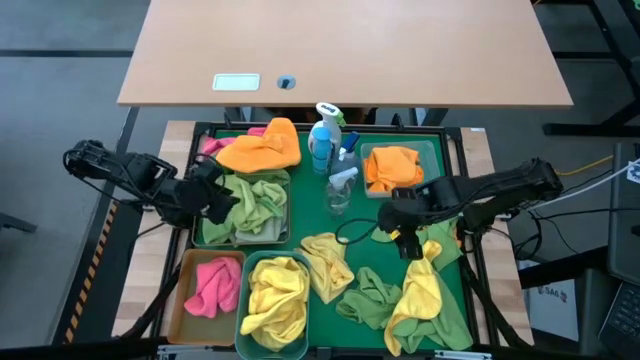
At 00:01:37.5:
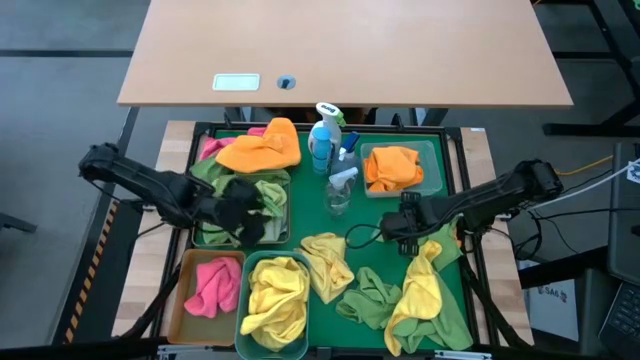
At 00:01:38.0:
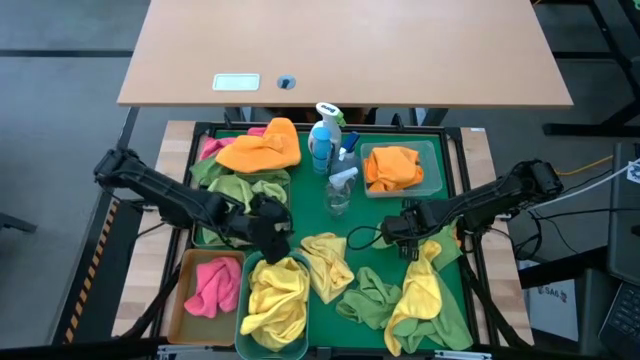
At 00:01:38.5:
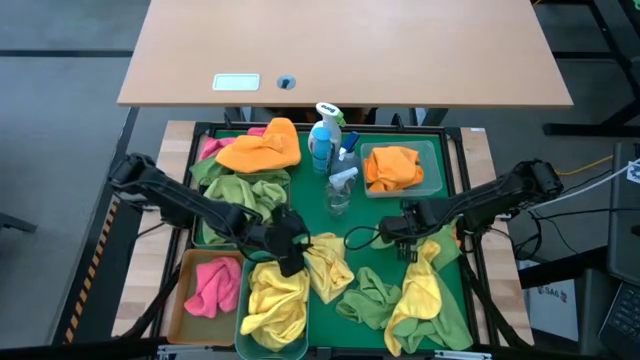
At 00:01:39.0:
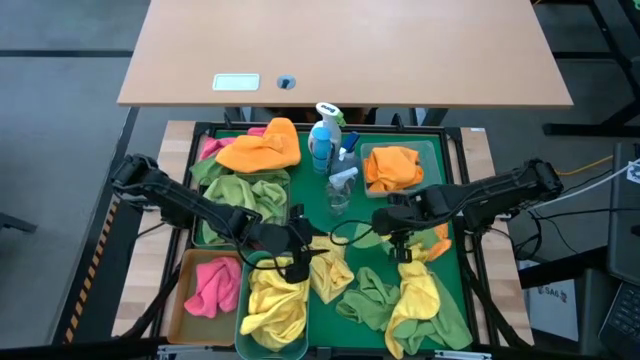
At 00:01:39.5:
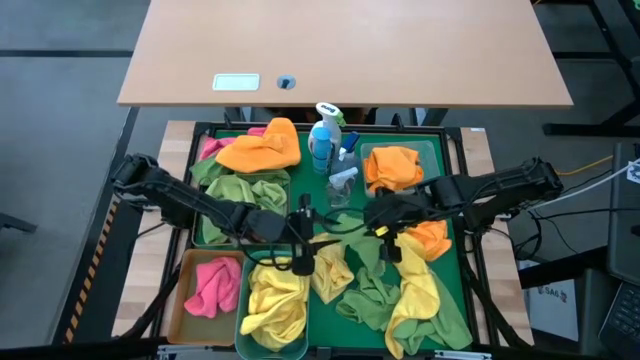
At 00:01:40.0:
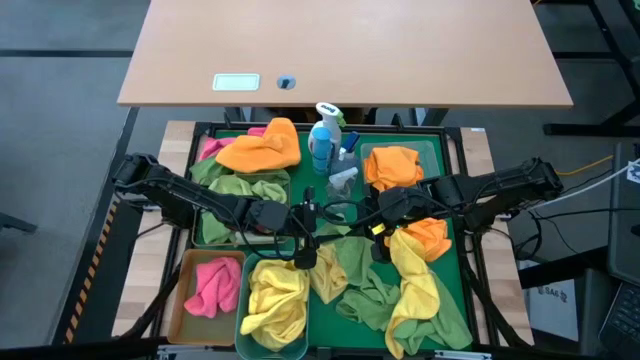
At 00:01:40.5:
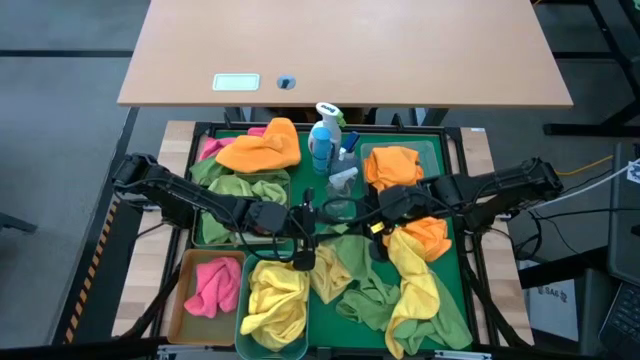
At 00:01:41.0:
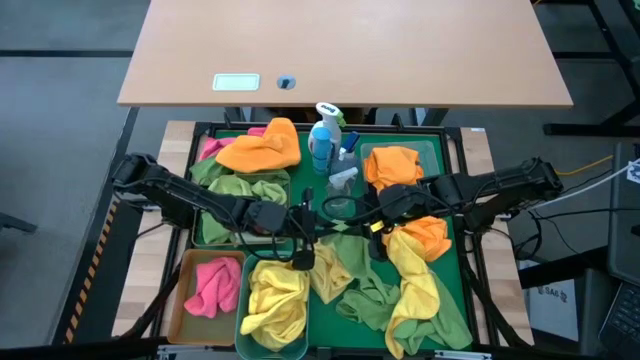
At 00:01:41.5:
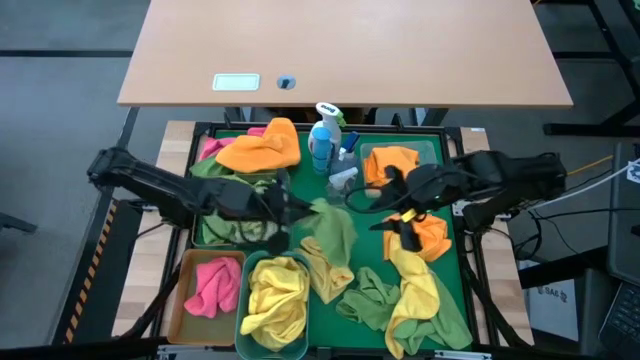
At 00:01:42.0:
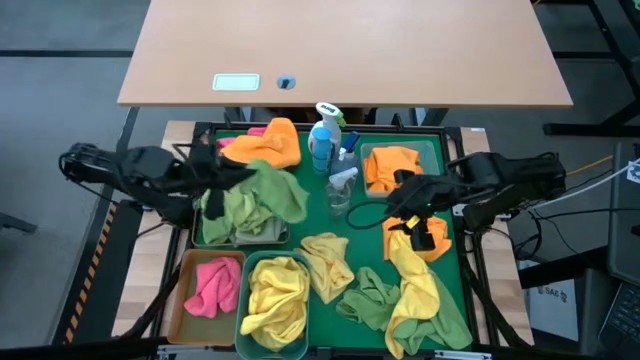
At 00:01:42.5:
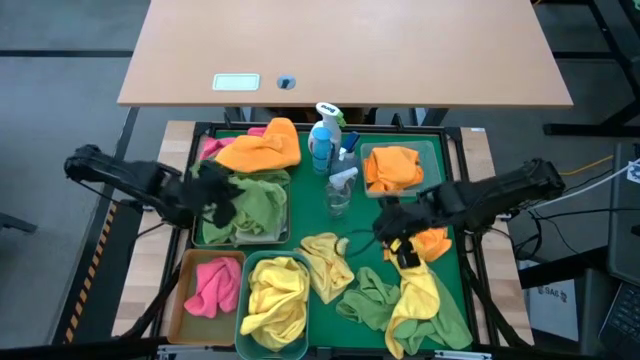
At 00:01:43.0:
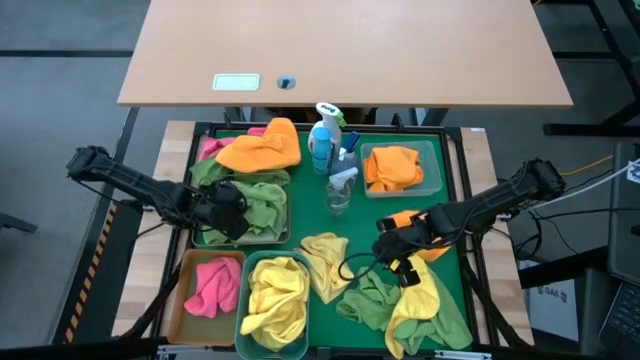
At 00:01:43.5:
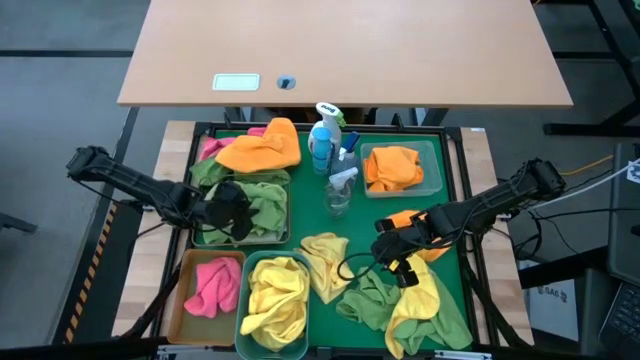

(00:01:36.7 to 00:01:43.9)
Task: Sort microfiber towel by color & place in baskets
Put the green towel into the wire basket

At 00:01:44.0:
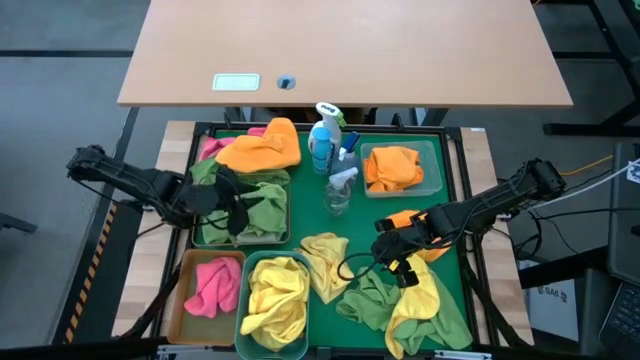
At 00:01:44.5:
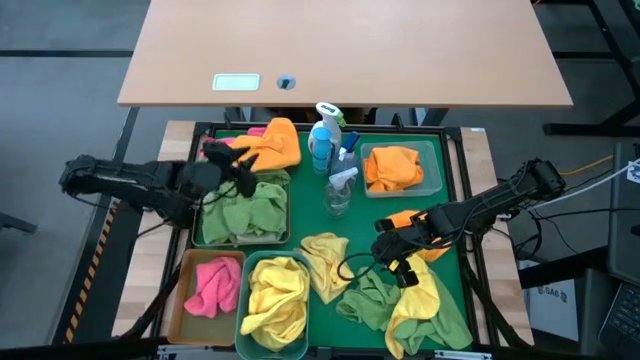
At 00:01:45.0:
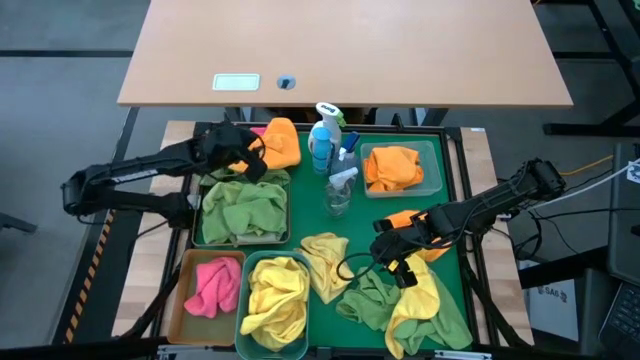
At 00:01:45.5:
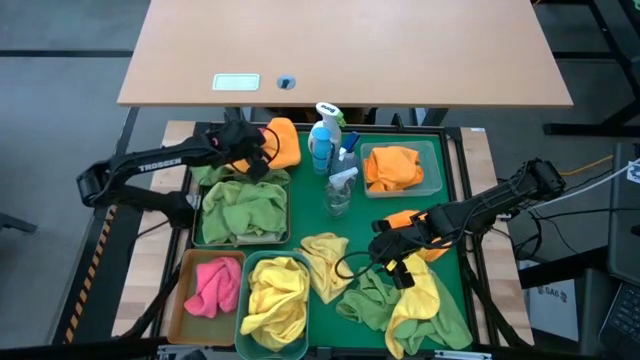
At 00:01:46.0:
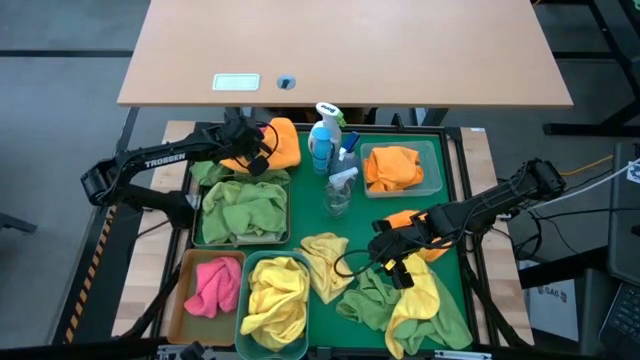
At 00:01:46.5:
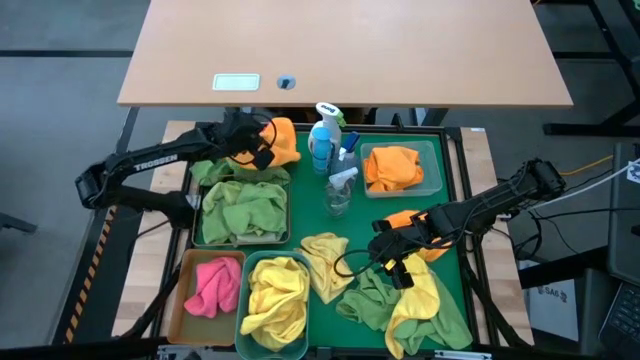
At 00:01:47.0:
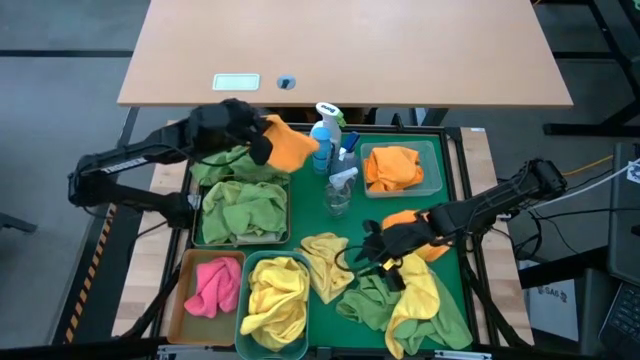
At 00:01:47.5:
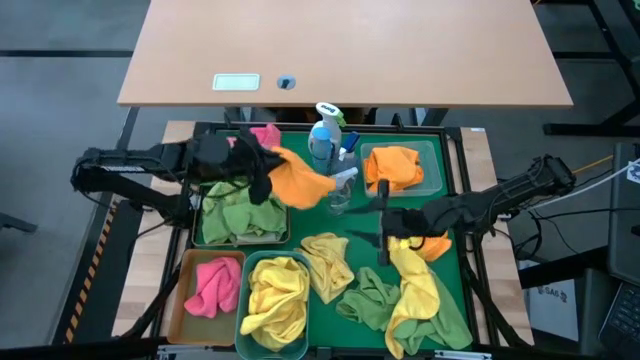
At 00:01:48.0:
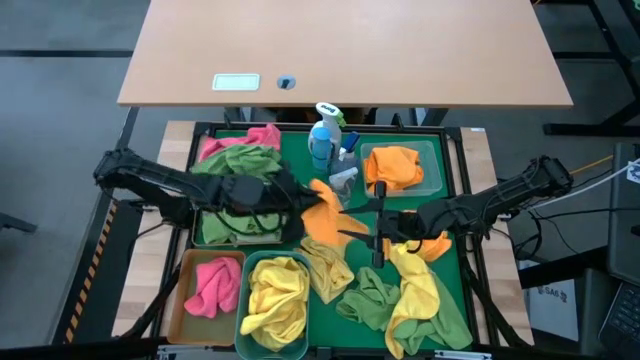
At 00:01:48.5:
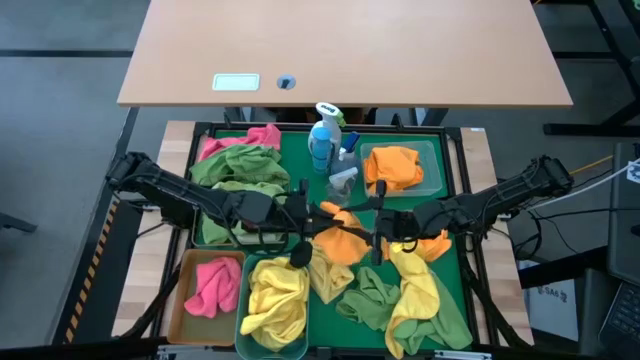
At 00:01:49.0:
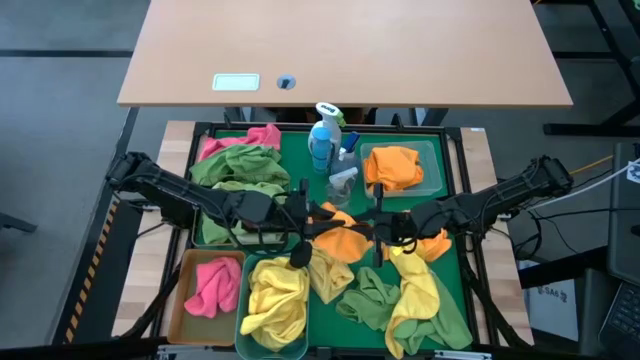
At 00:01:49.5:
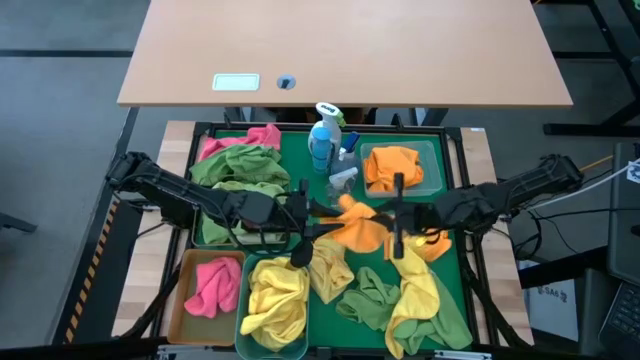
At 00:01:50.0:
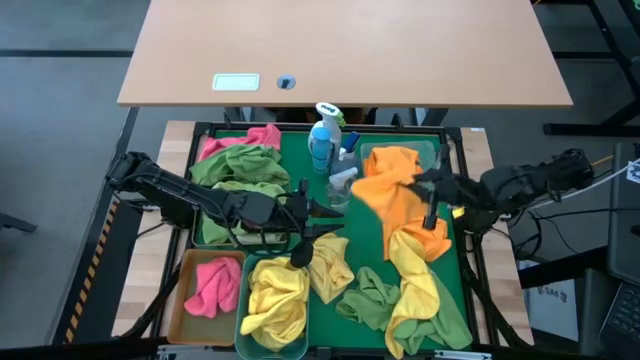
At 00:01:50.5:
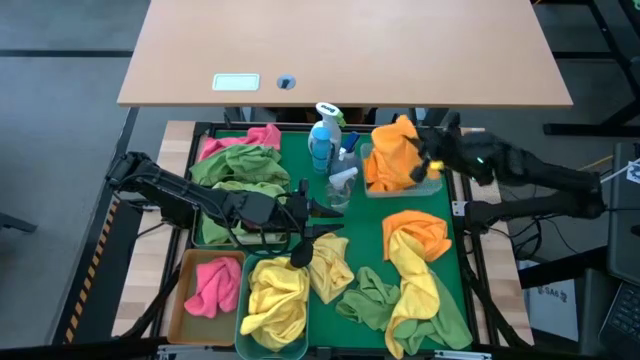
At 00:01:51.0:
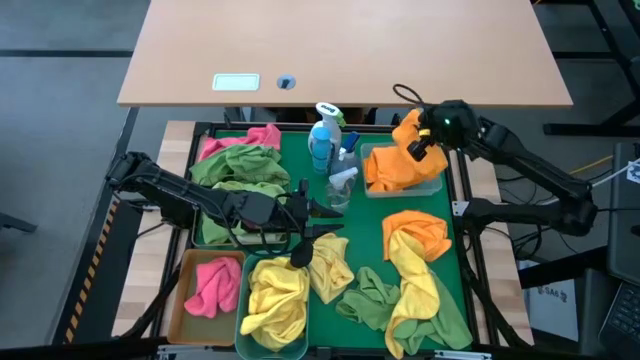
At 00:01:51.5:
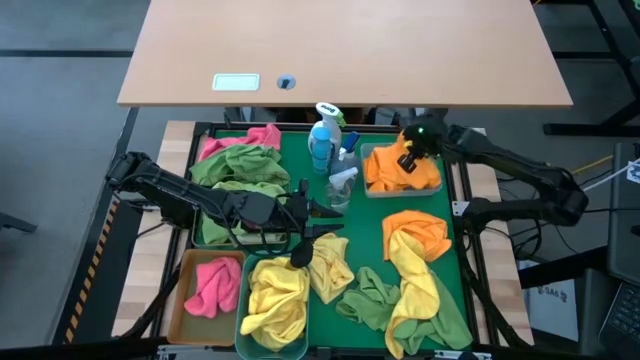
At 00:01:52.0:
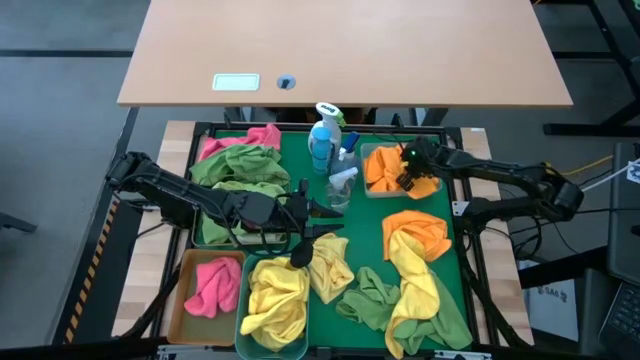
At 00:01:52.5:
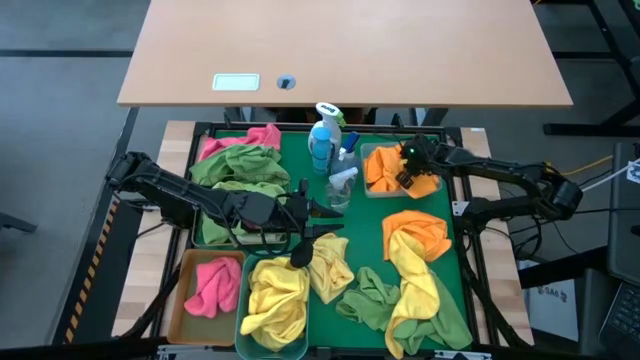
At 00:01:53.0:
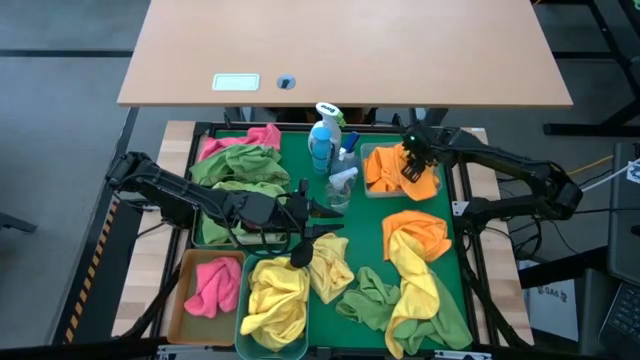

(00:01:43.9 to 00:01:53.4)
Put the orange towel into the white bin

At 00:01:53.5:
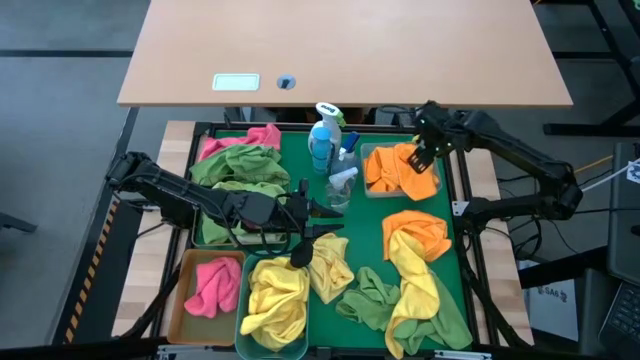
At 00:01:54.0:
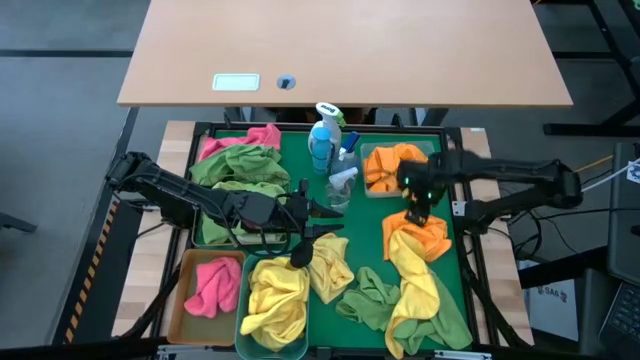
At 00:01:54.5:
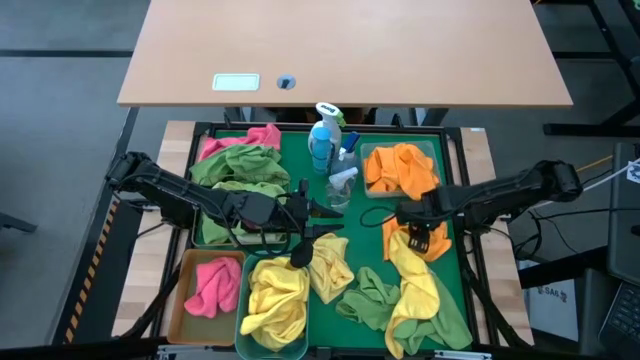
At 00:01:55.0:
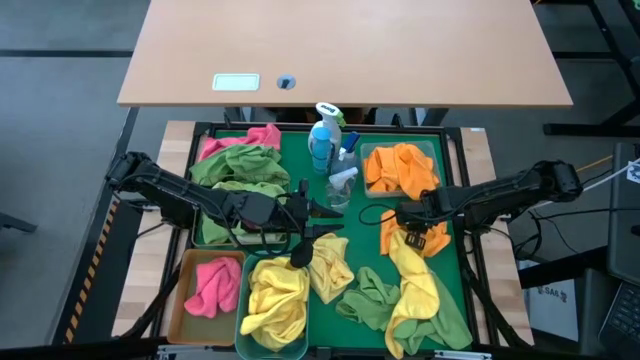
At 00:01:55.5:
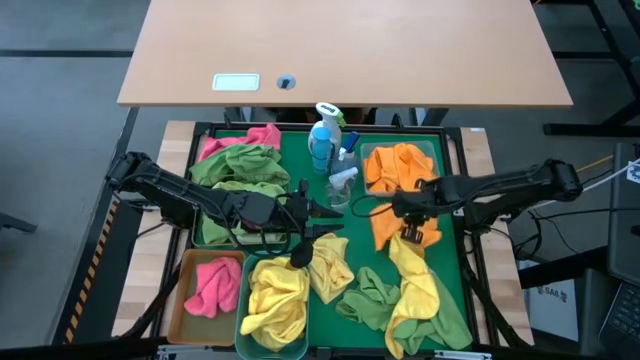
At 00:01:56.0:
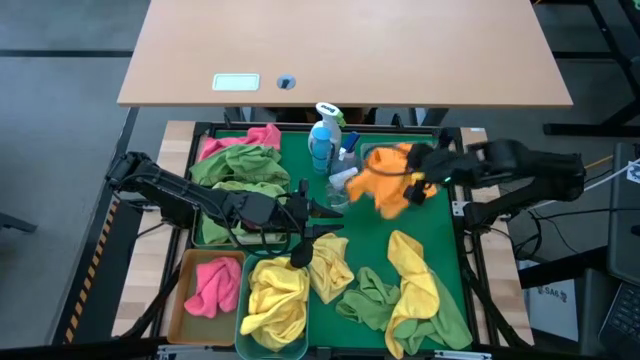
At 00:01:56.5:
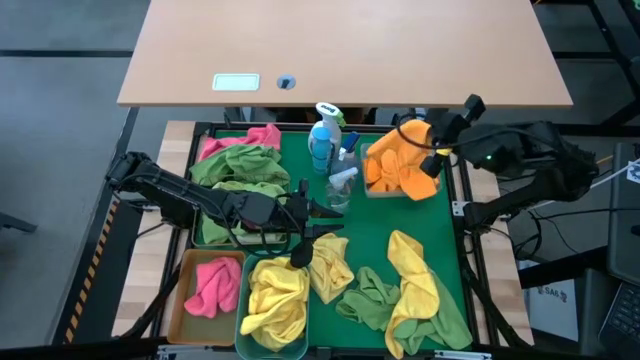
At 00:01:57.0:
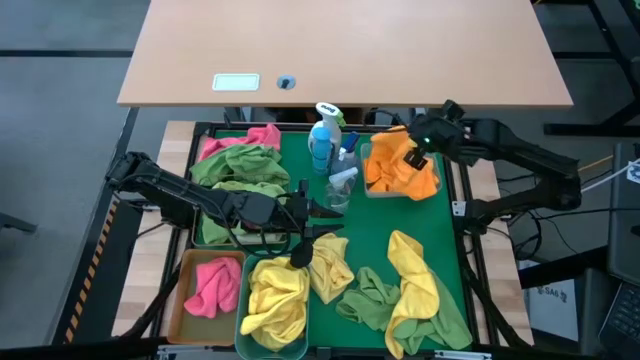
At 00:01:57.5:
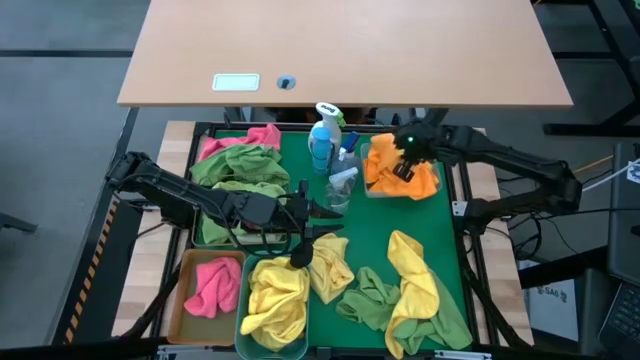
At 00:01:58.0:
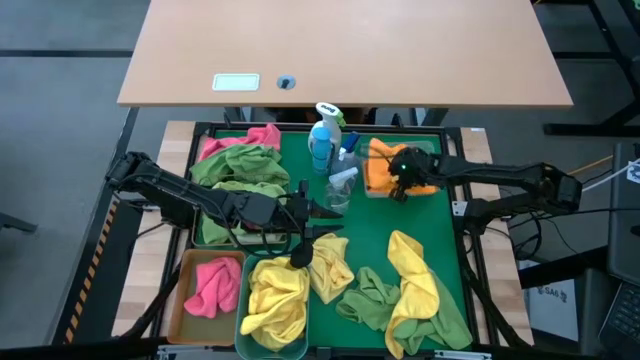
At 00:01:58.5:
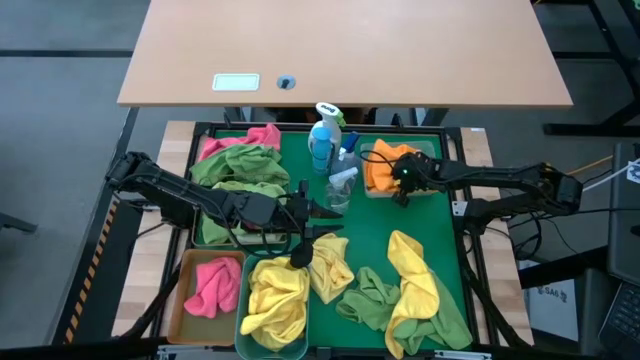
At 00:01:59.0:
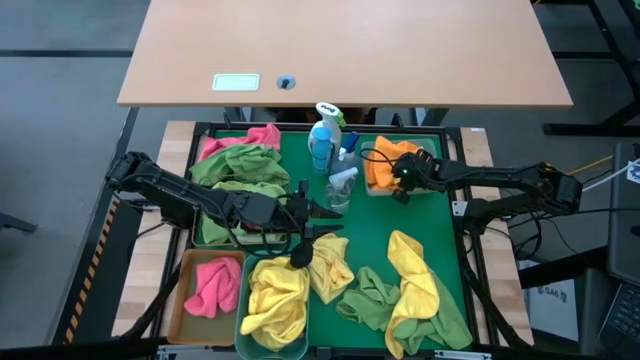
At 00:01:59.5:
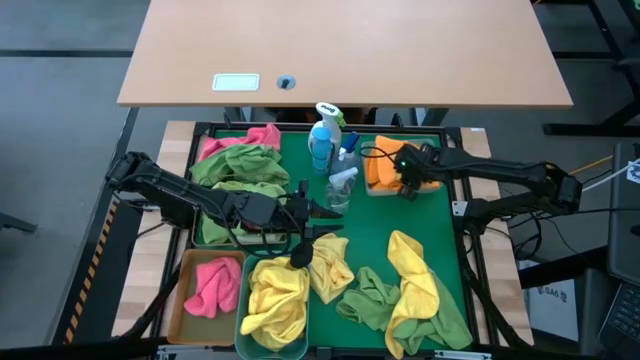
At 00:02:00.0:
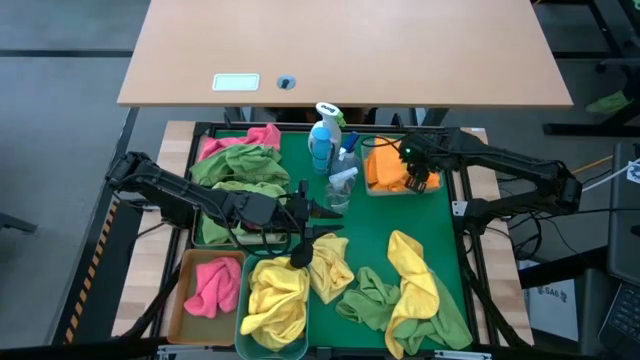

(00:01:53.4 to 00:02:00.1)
Put the orange towel into the white bin
